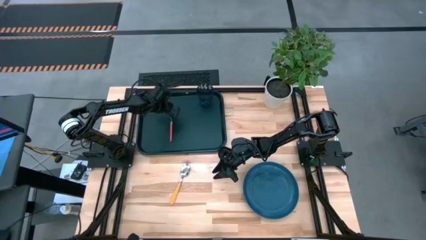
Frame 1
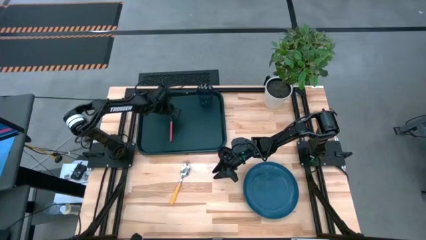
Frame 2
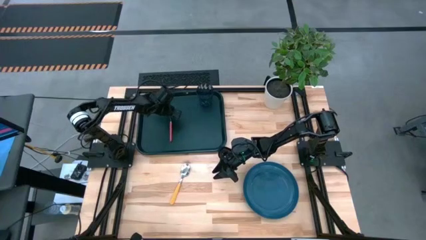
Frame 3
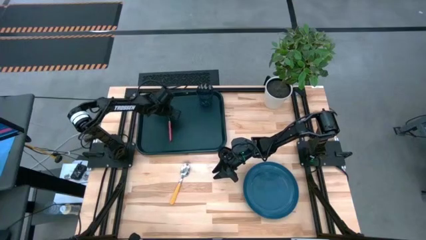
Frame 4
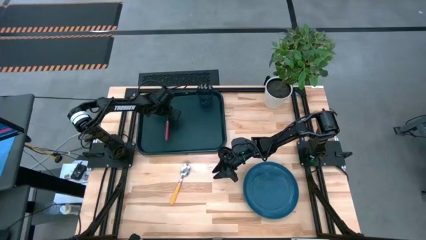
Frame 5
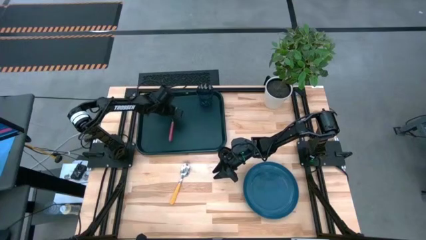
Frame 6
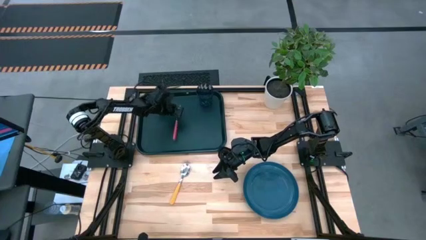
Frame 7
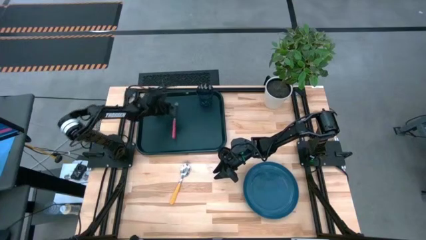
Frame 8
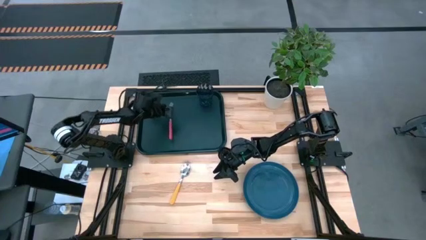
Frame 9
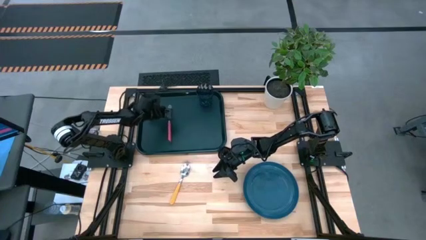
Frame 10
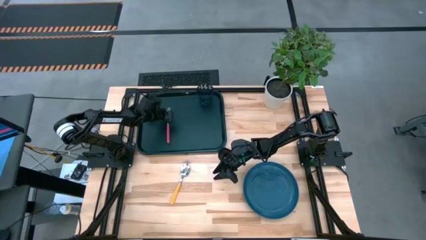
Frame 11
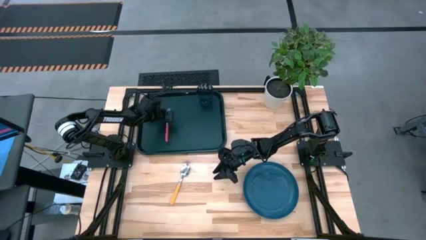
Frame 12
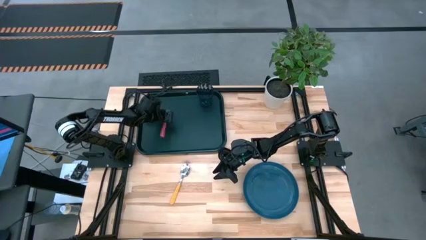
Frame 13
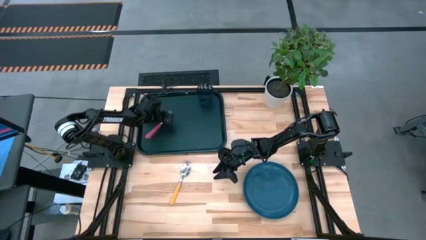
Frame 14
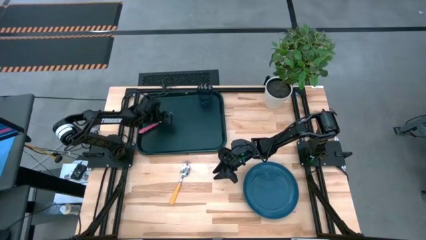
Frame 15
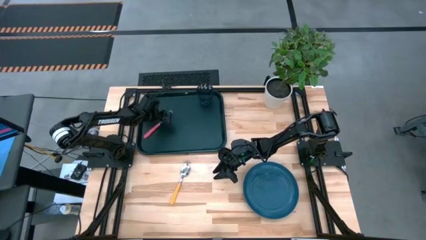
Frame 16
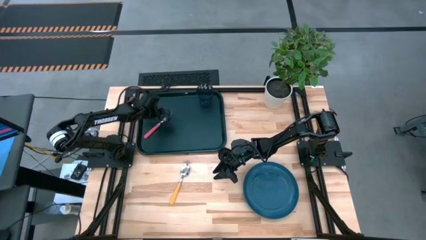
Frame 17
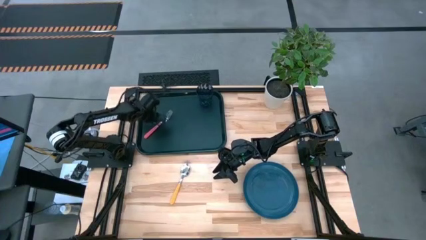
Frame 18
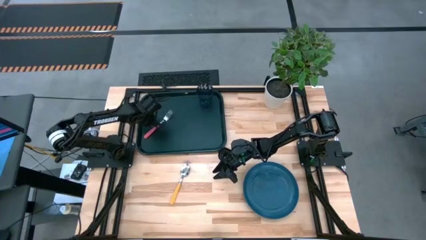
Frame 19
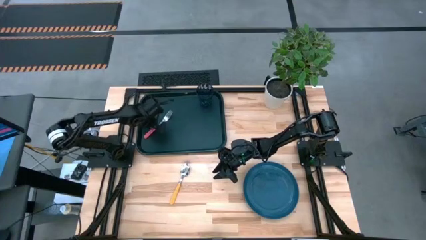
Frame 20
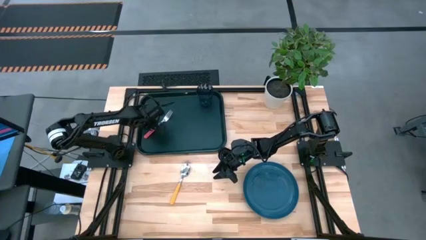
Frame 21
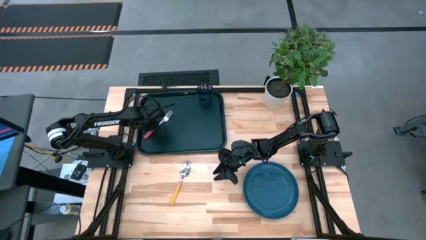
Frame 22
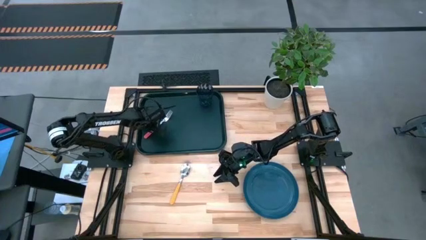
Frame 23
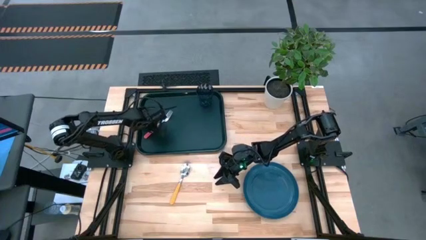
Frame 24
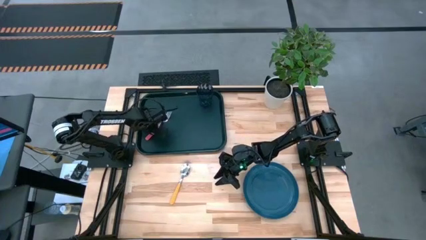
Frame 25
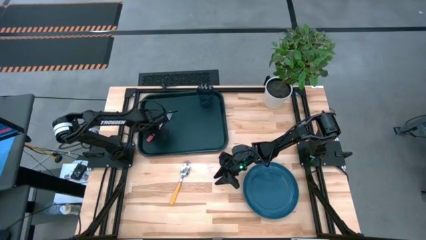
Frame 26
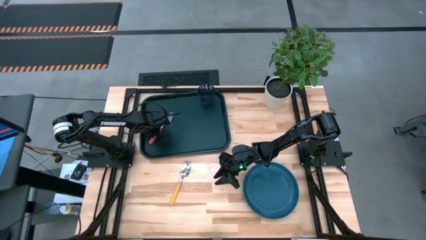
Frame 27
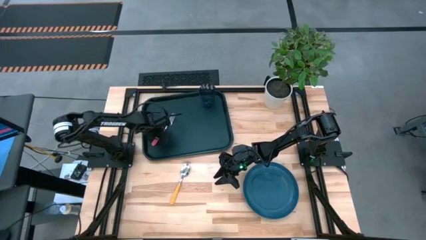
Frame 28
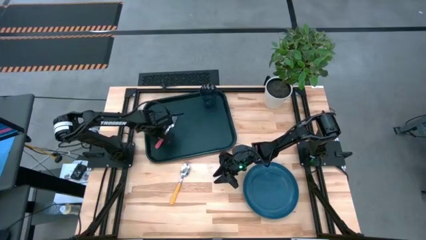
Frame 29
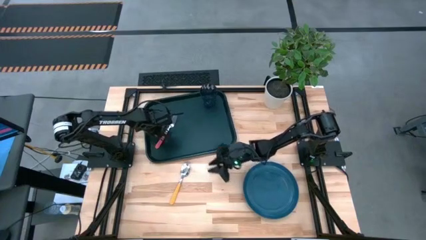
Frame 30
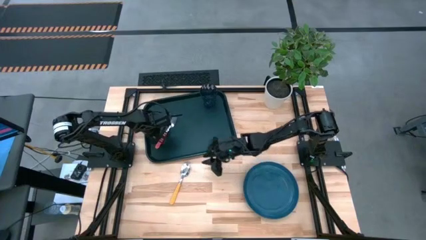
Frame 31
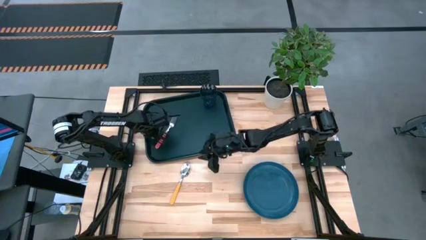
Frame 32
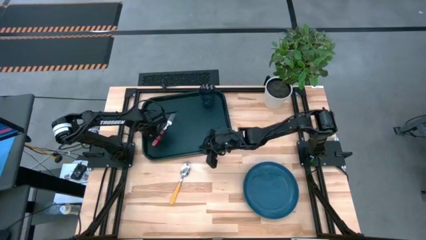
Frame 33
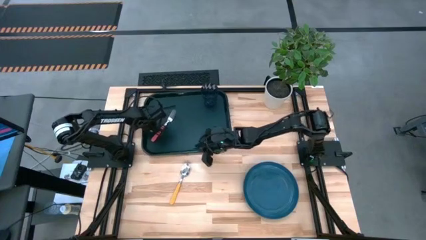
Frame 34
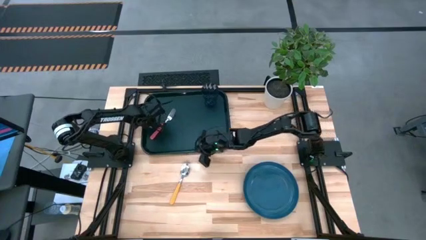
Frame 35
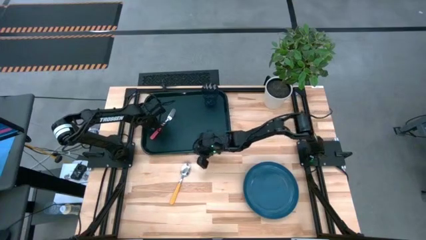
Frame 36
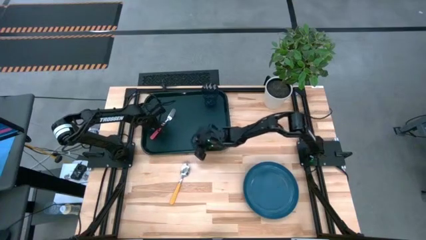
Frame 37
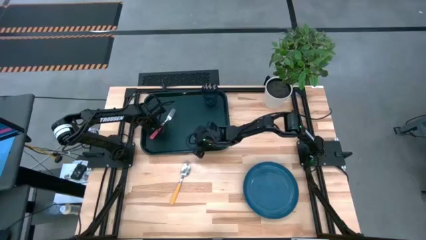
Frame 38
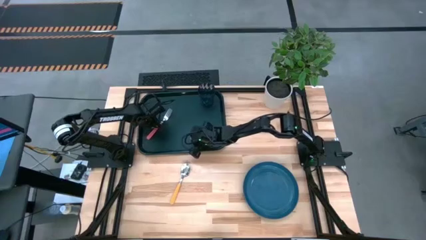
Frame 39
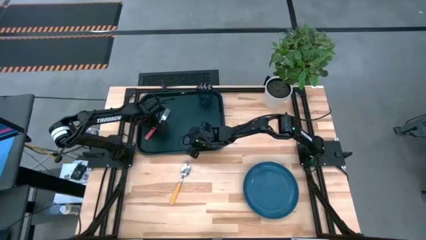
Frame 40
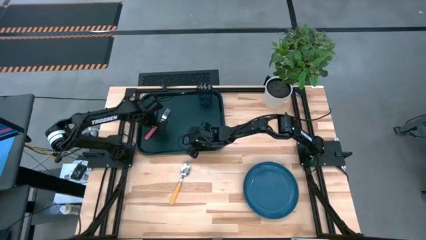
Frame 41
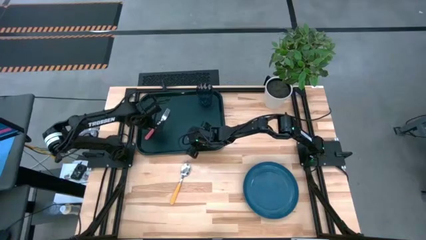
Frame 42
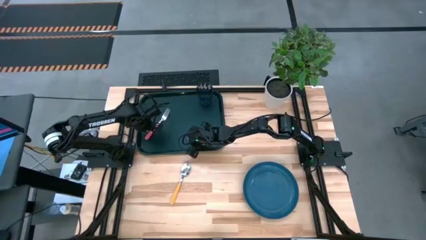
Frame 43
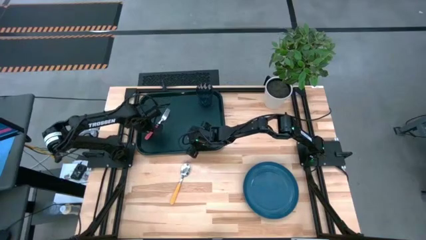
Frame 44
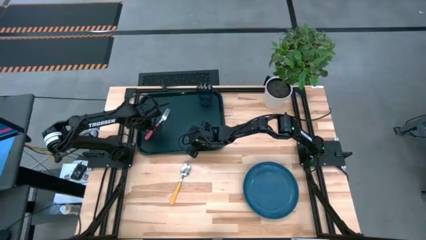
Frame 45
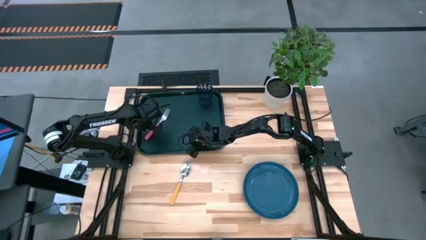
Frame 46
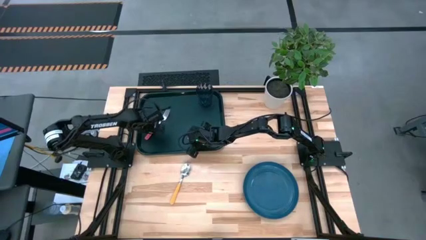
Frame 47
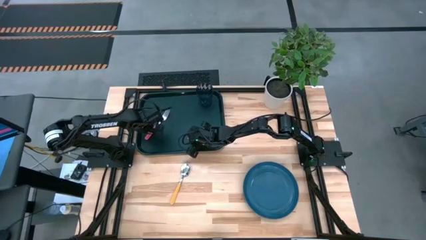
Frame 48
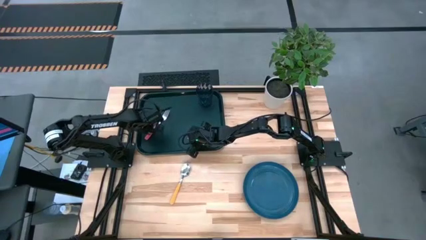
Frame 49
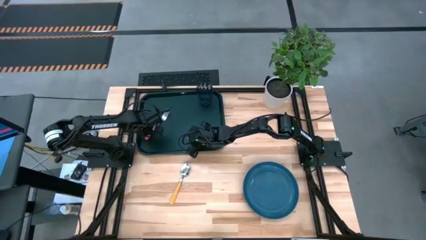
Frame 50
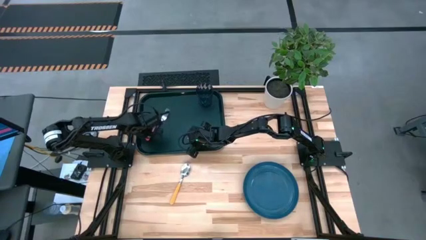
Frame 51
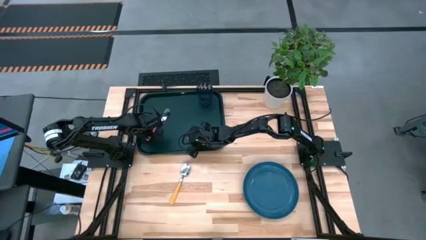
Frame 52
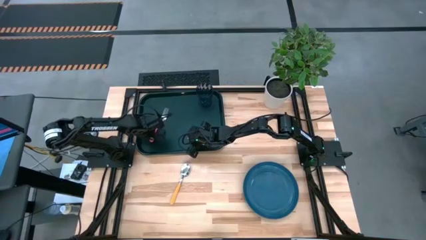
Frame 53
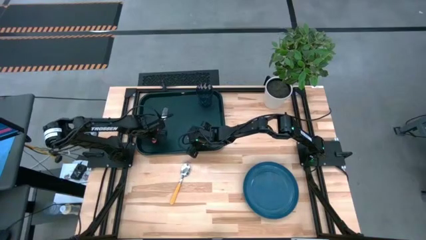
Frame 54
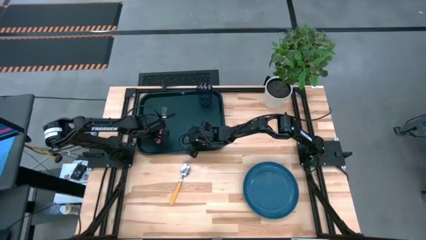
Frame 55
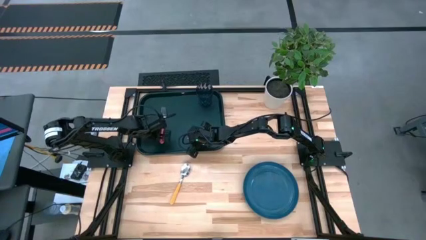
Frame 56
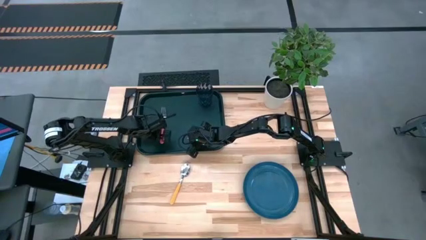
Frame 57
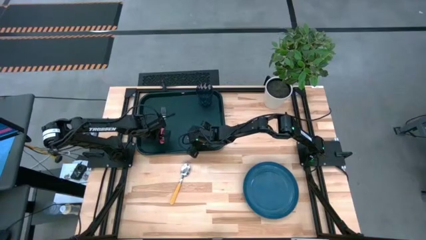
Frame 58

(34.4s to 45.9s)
Task: Pick and place plate/cup/fork/spoon on tray
Put the pink fork on the black tray to the bottom left of the blue glass

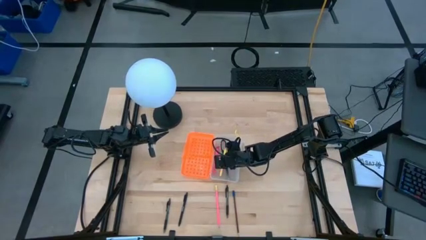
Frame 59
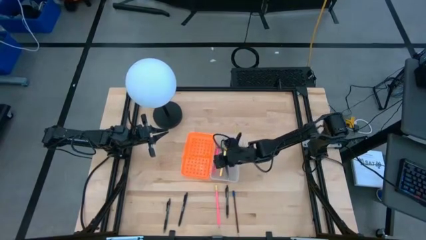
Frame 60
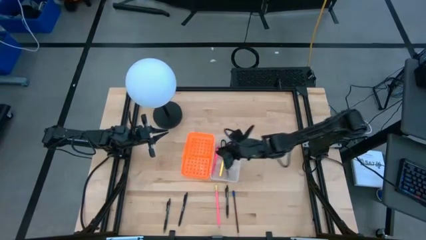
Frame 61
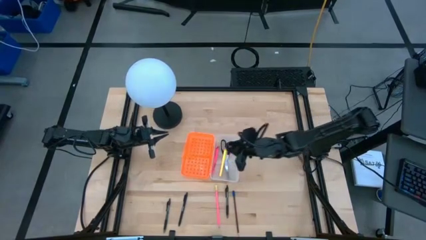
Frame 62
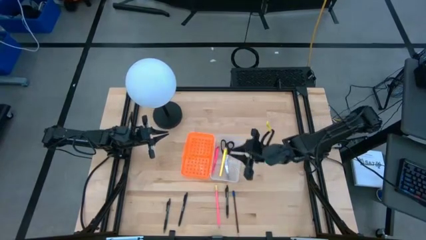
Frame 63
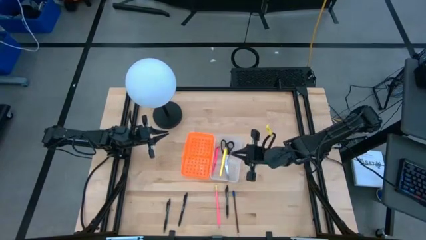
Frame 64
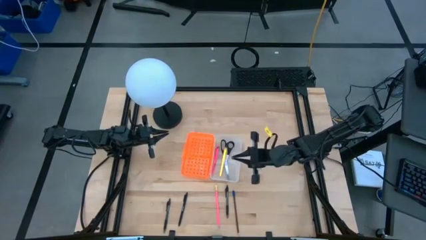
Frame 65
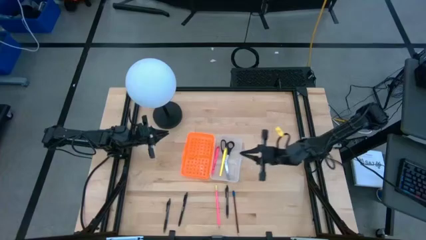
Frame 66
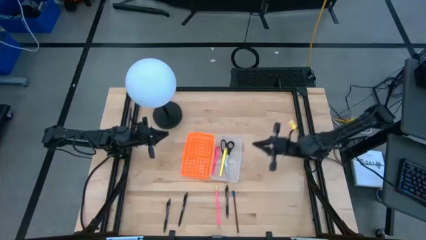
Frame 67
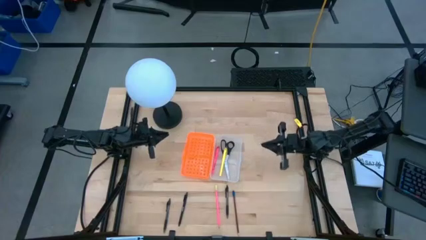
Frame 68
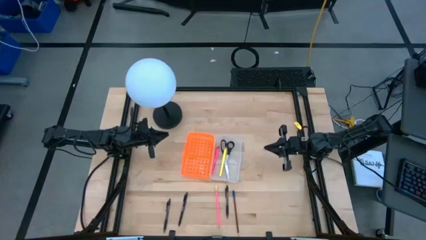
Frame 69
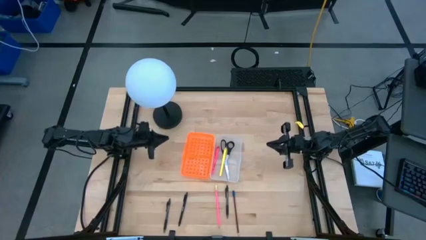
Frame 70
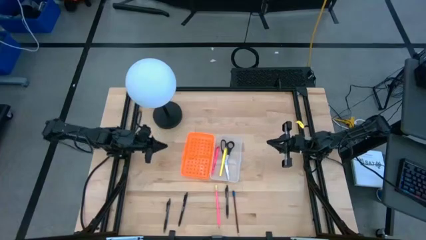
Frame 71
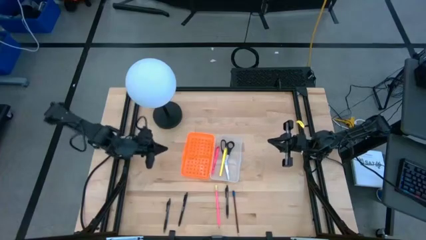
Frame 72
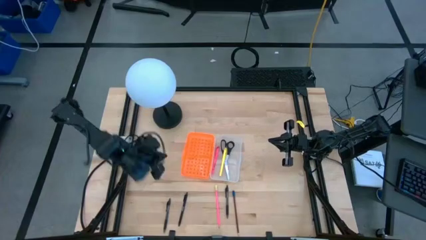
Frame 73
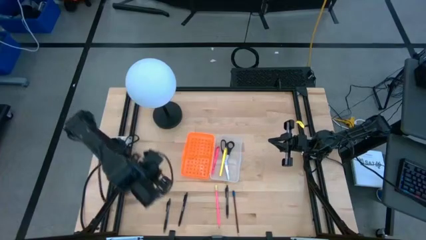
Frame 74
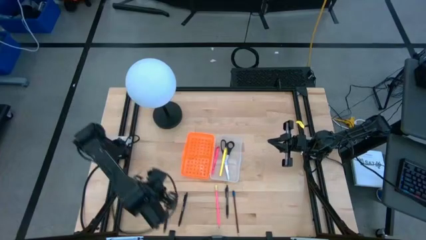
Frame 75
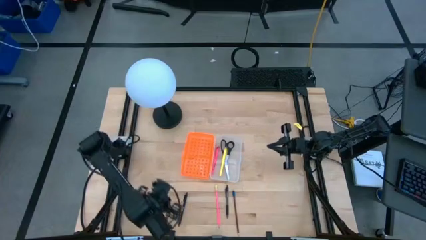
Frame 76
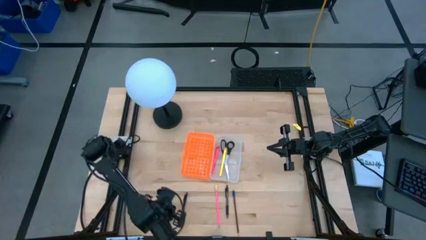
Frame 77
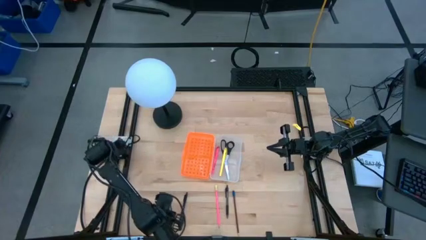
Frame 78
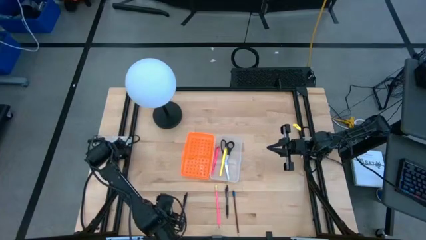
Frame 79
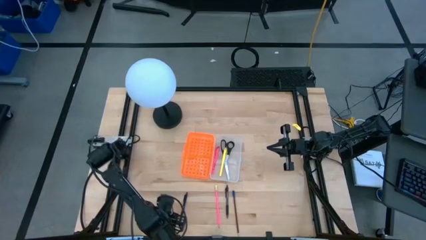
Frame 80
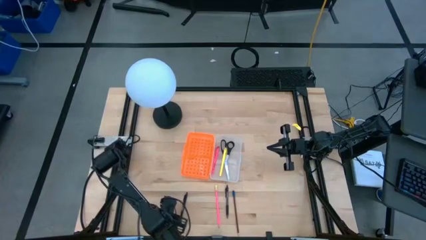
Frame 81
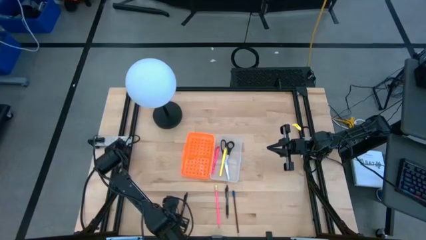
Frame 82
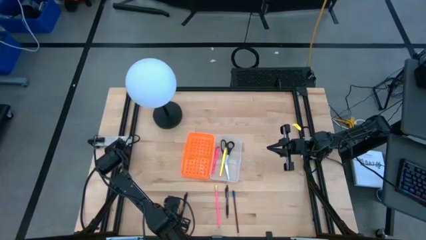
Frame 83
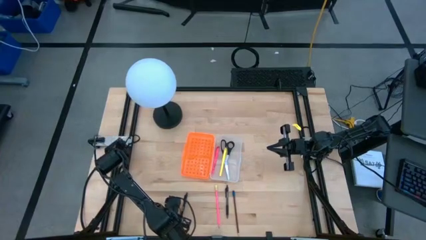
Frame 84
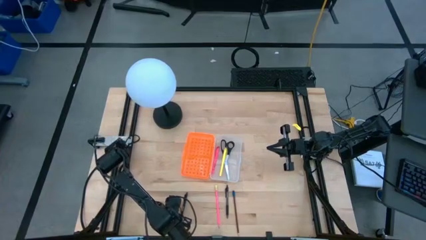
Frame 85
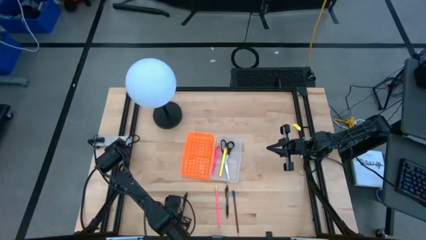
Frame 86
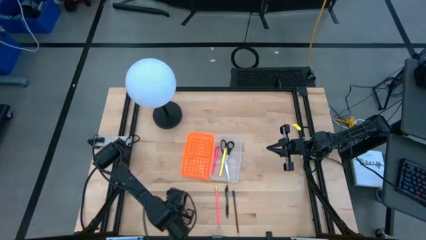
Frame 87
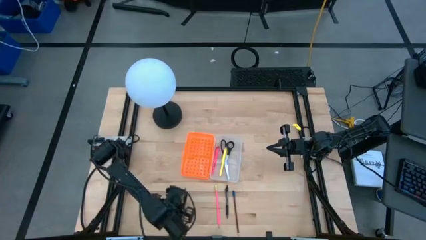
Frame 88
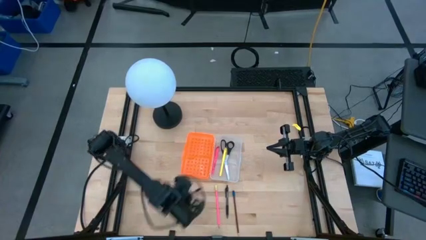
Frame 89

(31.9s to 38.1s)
Task: Pick & place school supplies into a supply box
Put the left transparent pen into the orange supply box
